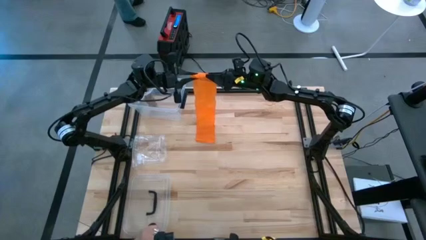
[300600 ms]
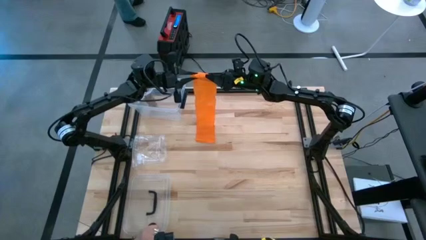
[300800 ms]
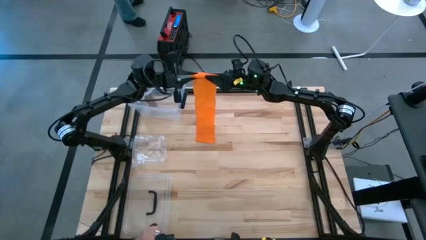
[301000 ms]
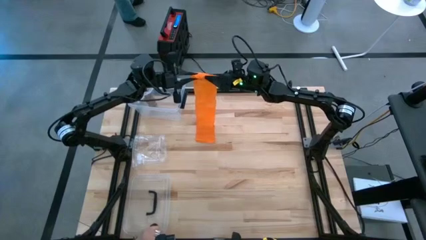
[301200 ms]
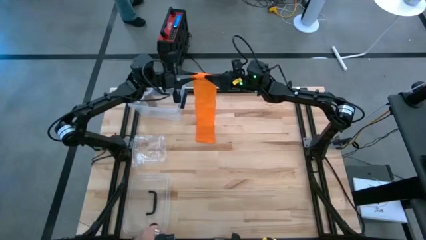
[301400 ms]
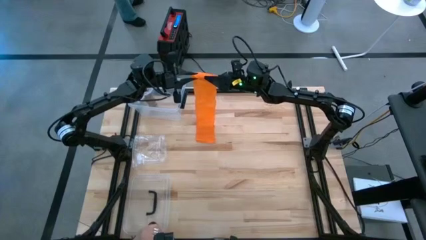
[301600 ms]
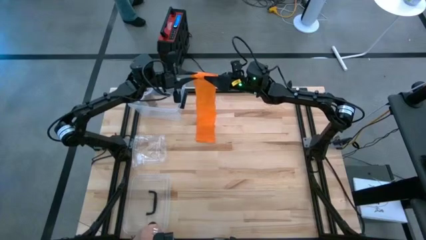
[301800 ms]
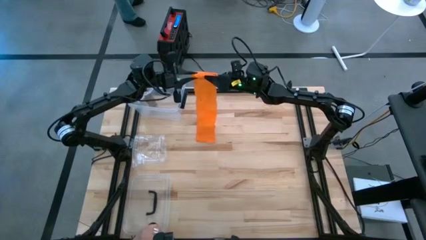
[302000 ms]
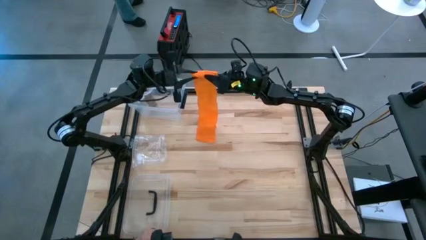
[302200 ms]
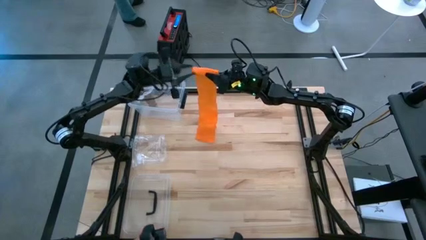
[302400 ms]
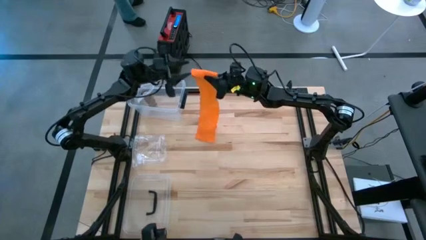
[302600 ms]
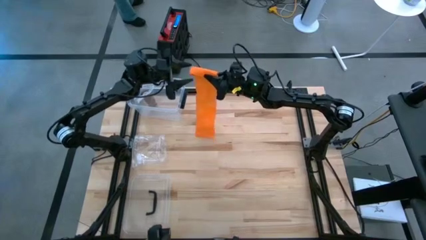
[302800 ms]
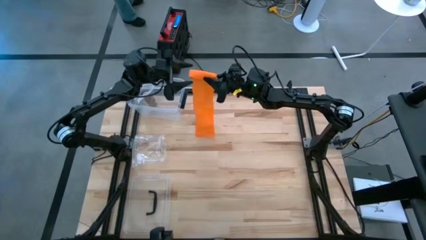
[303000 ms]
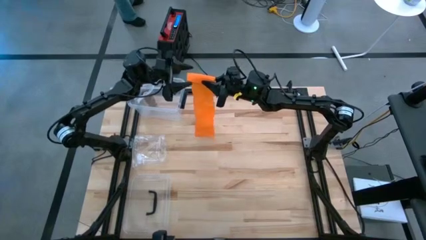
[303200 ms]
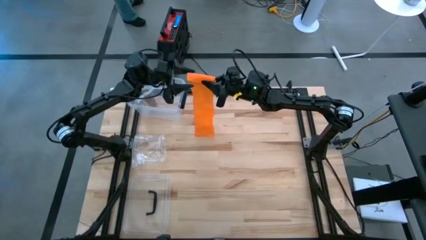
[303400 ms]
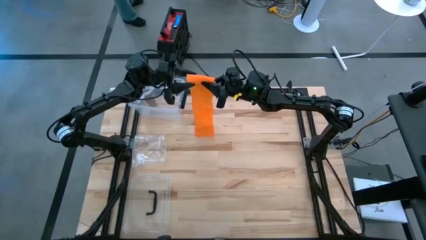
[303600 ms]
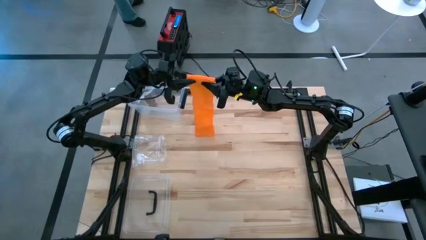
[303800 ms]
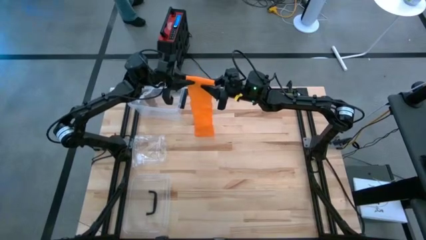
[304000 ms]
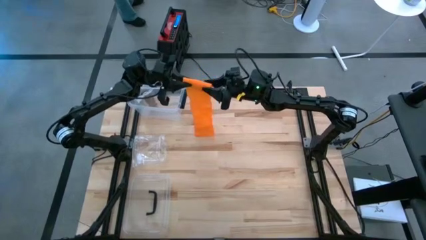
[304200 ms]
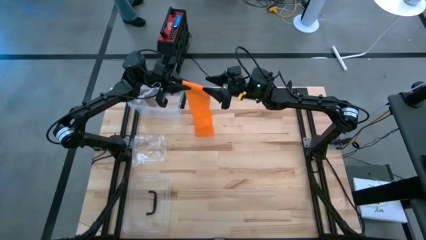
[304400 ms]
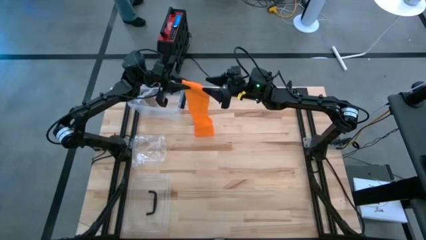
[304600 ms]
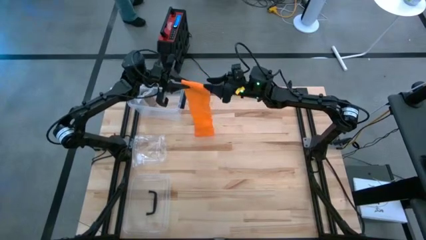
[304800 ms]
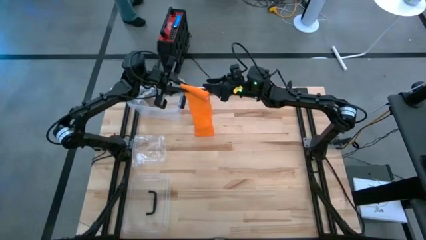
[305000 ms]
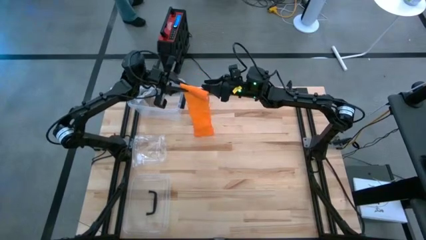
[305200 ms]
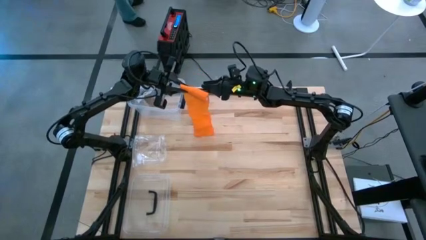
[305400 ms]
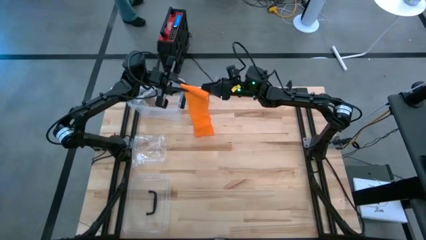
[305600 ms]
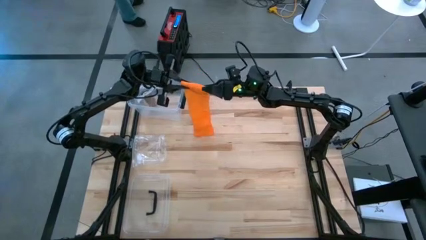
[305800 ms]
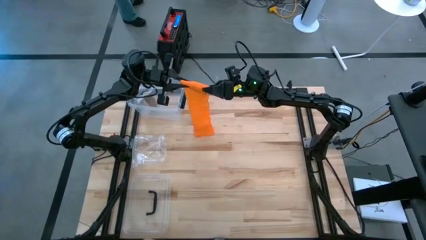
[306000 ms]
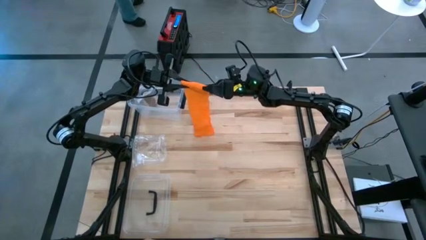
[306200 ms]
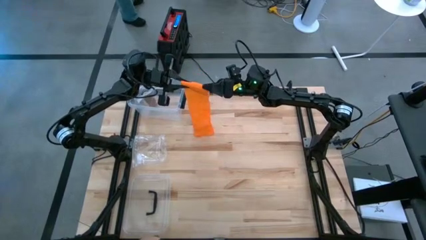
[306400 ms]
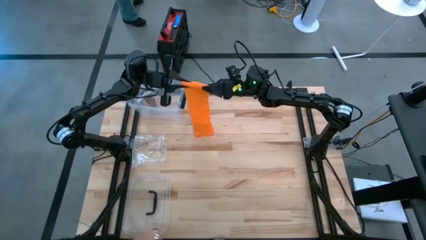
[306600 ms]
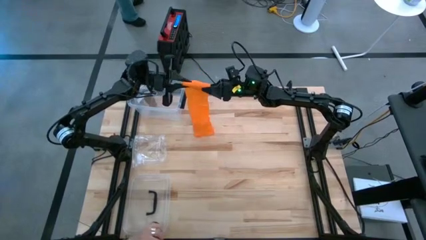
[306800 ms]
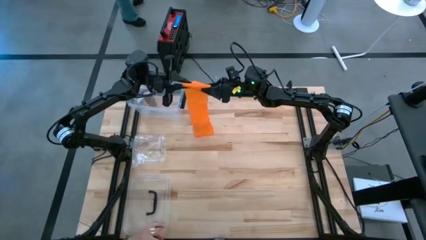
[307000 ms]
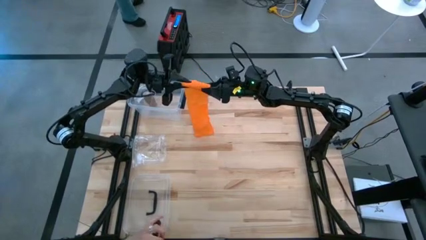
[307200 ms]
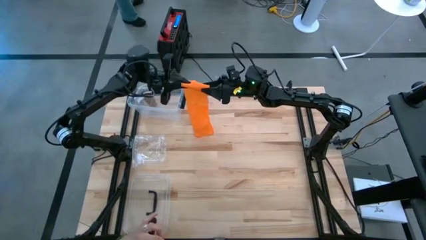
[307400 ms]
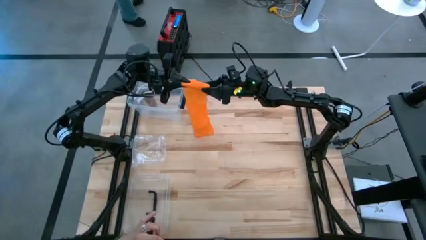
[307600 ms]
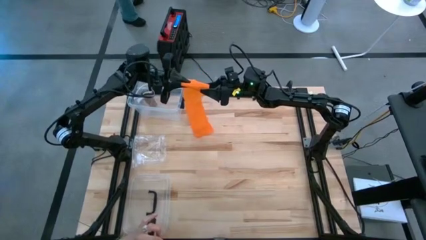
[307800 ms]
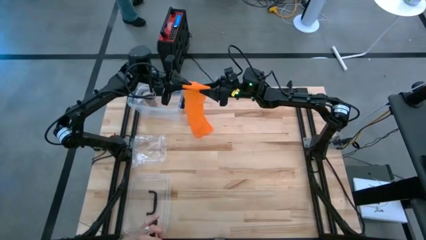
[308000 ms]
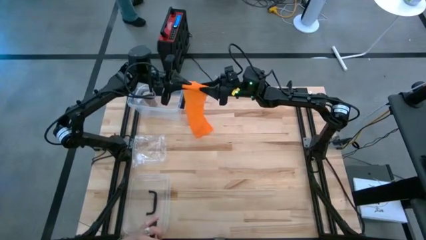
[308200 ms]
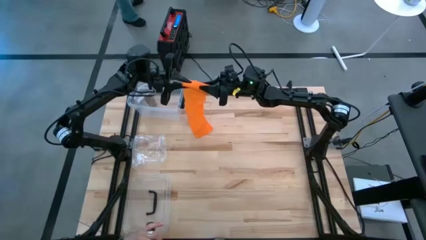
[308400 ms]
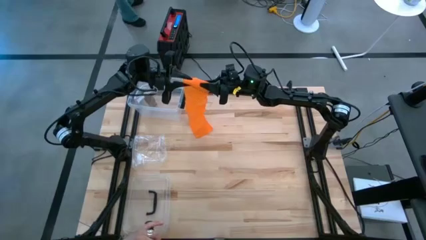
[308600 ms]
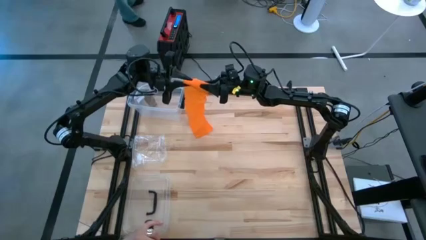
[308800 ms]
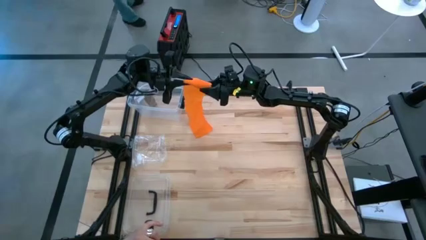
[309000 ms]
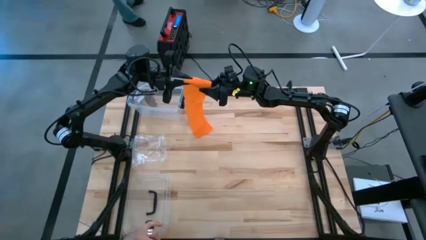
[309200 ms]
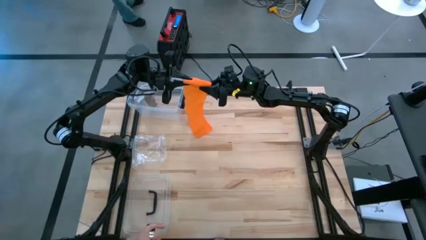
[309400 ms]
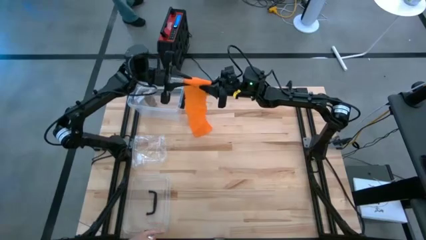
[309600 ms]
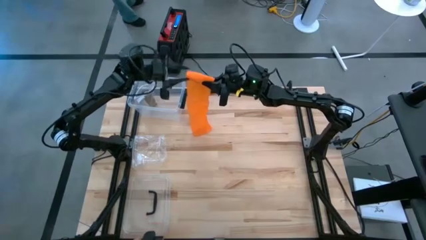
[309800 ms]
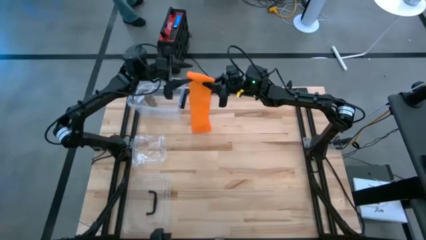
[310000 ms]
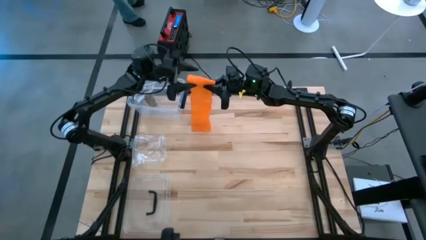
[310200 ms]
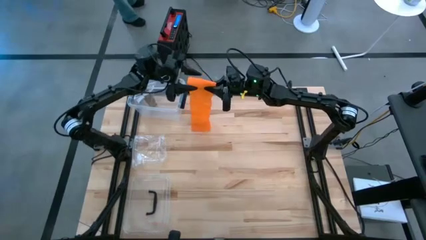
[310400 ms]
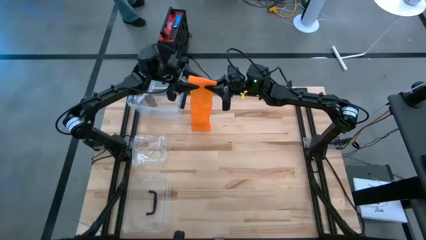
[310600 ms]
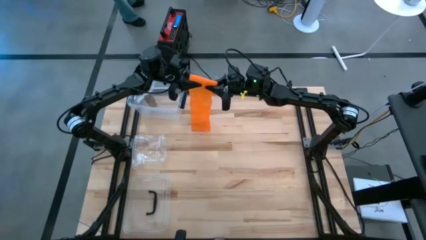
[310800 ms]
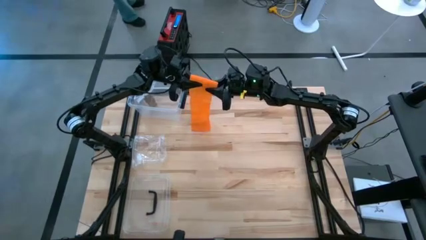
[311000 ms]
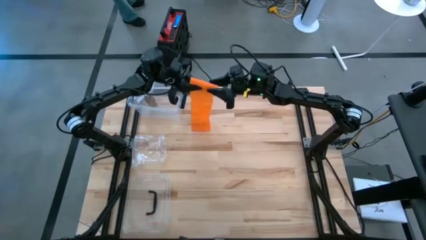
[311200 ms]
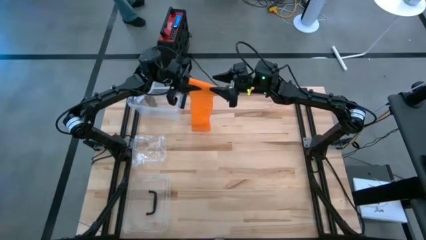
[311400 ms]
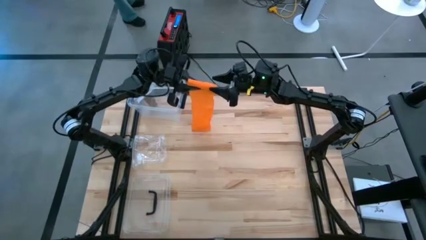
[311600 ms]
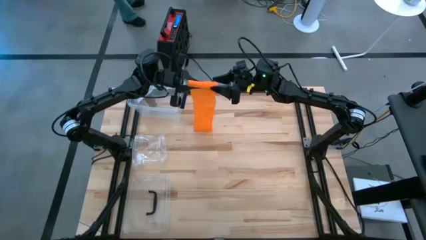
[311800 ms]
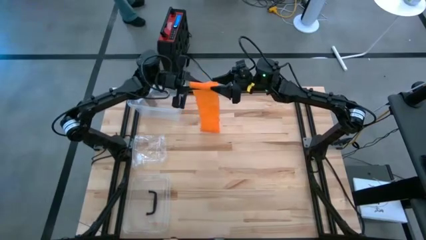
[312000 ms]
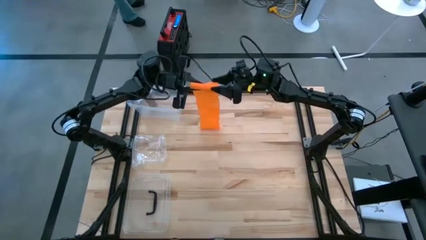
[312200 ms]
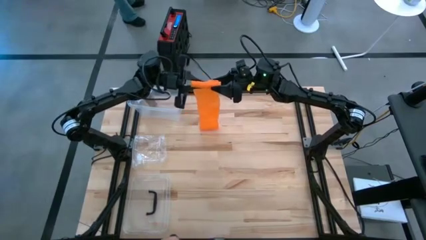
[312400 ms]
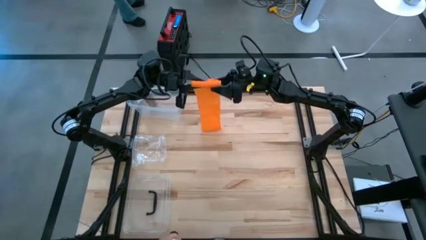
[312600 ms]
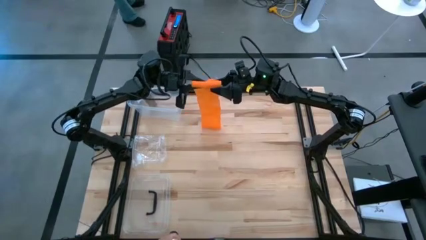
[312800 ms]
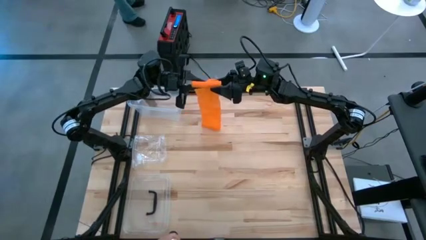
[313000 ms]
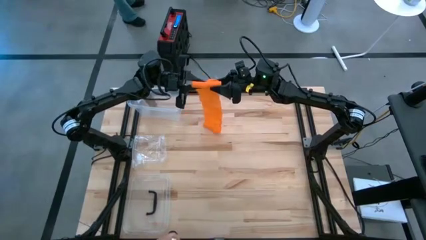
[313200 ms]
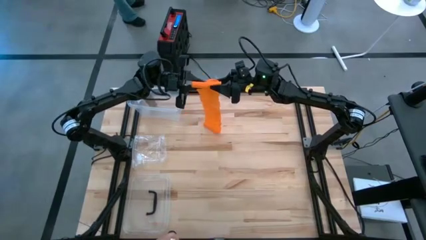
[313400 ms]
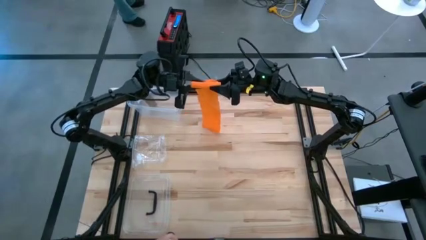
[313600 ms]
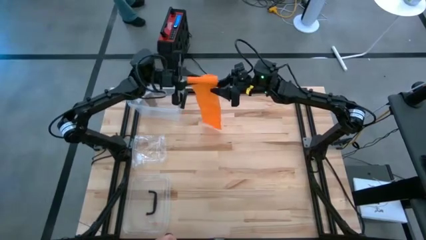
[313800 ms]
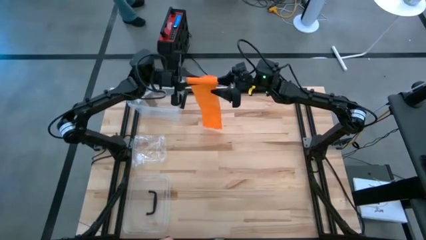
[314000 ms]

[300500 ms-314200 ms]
Task: Roll bandage
Roll the orange bandage

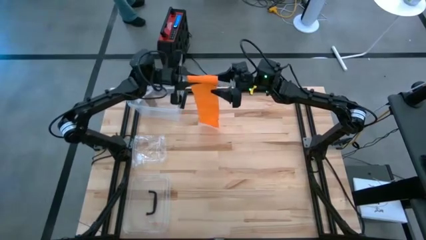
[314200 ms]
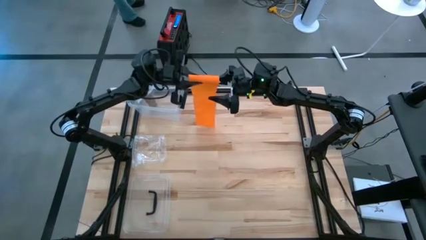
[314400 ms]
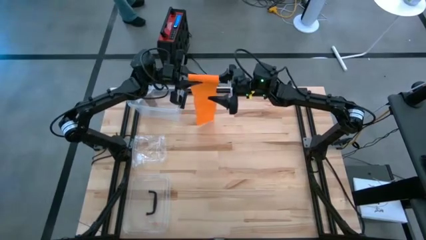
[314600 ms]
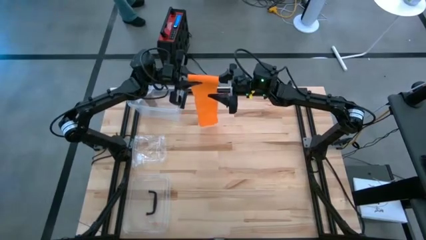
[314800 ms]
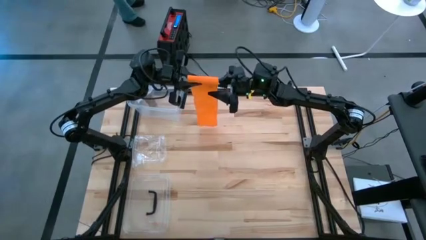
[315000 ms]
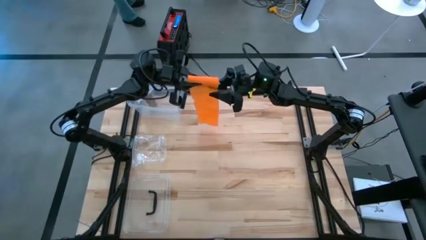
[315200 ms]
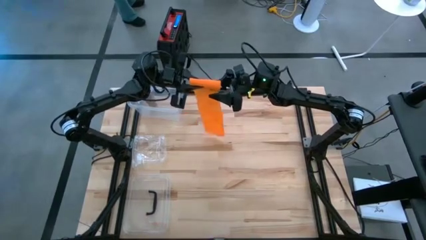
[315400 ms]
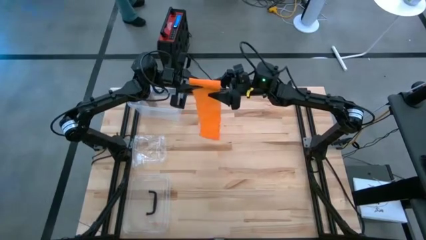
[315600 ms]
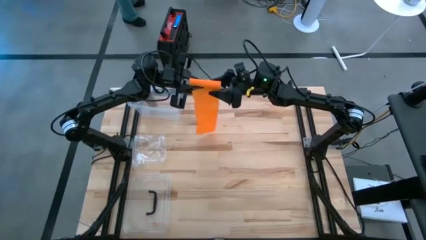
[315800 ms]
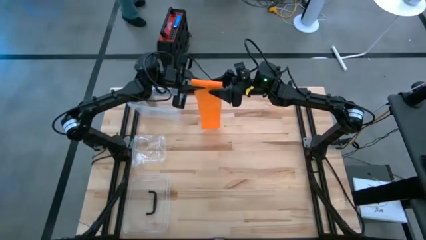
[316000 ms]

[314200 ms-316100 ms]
Roll the orange bandage
